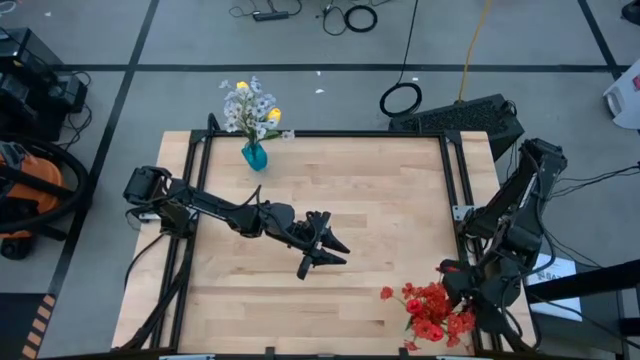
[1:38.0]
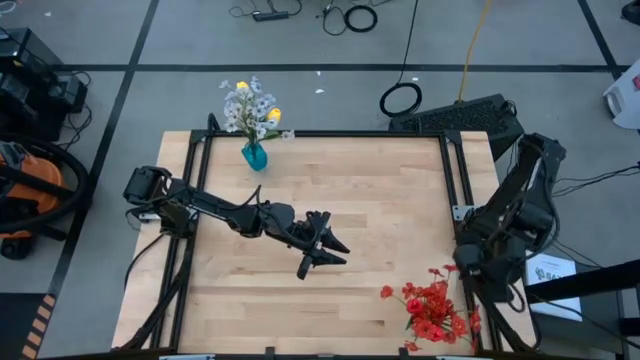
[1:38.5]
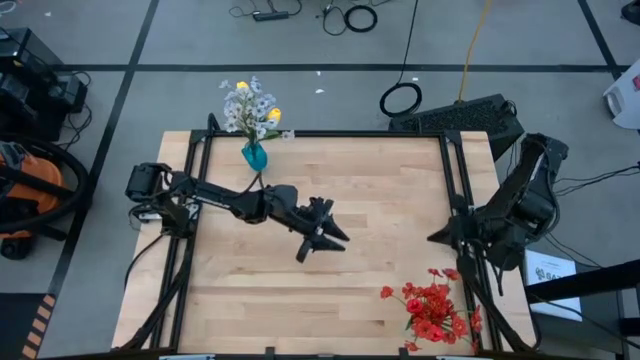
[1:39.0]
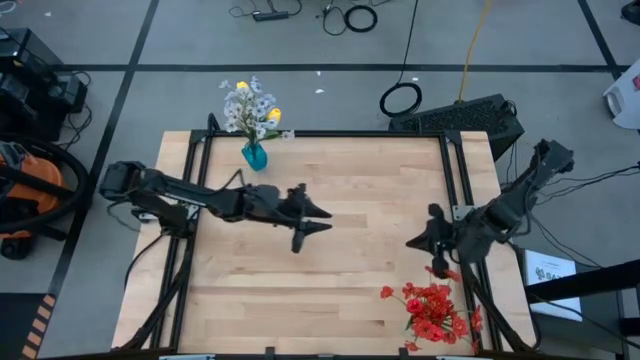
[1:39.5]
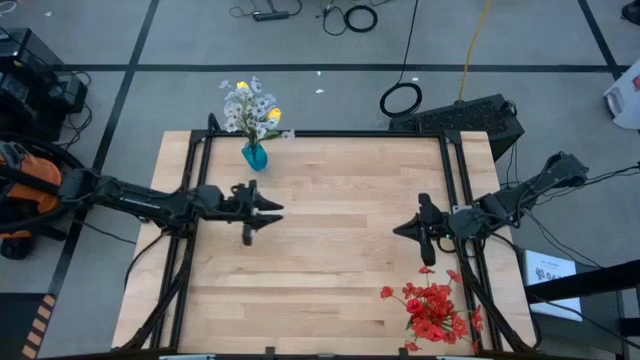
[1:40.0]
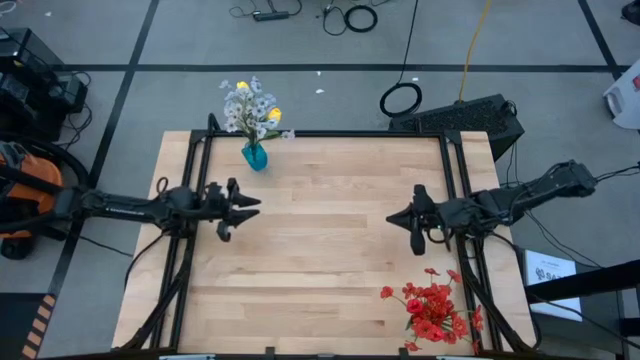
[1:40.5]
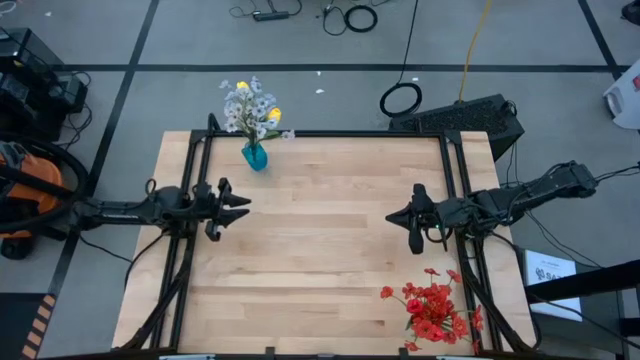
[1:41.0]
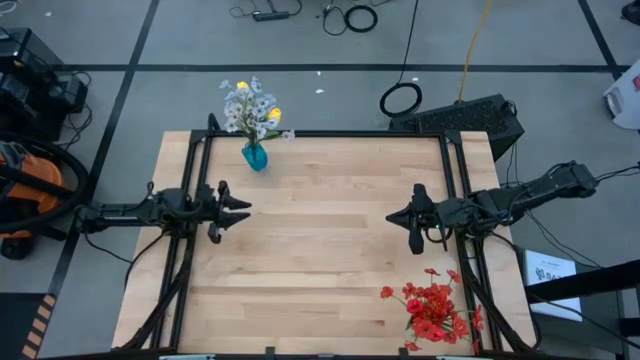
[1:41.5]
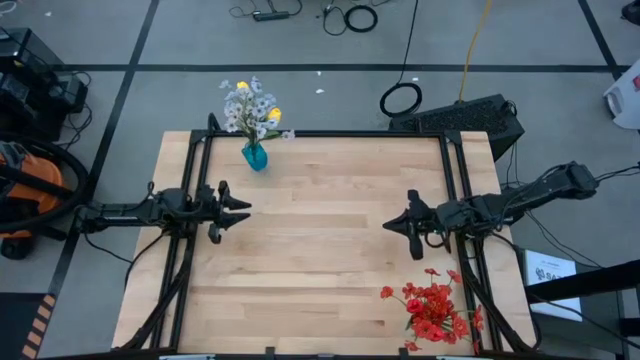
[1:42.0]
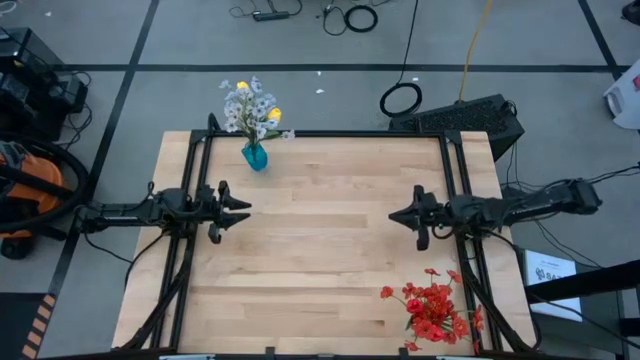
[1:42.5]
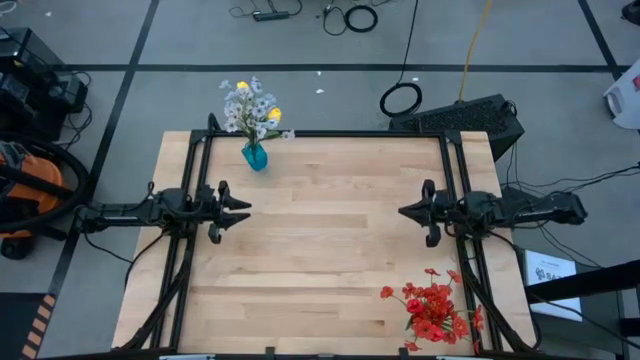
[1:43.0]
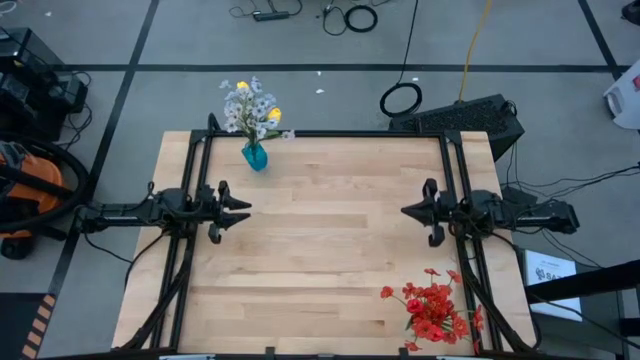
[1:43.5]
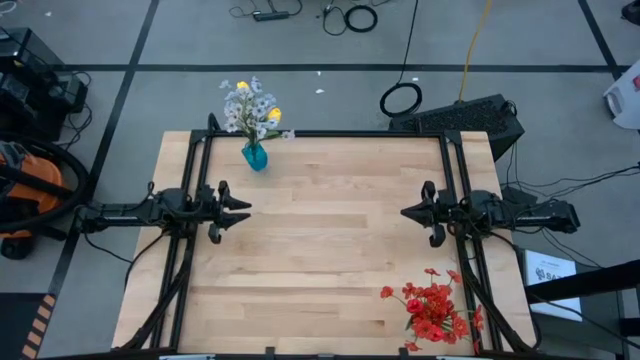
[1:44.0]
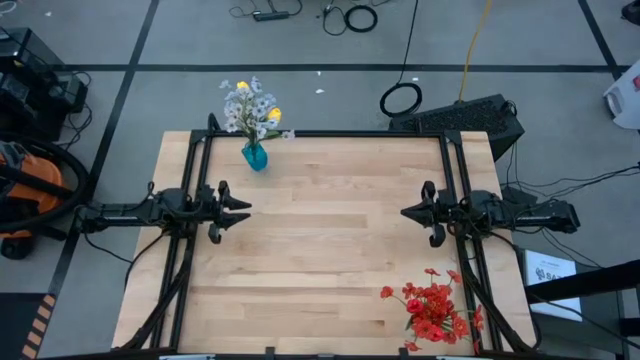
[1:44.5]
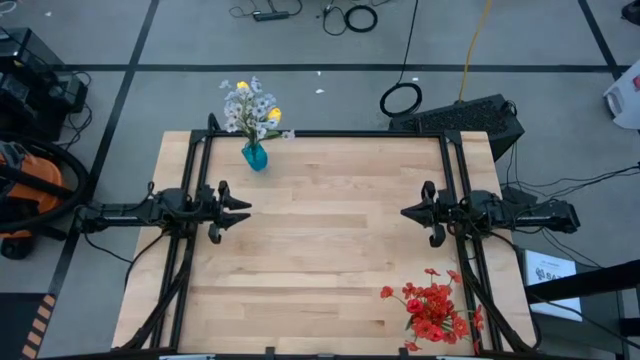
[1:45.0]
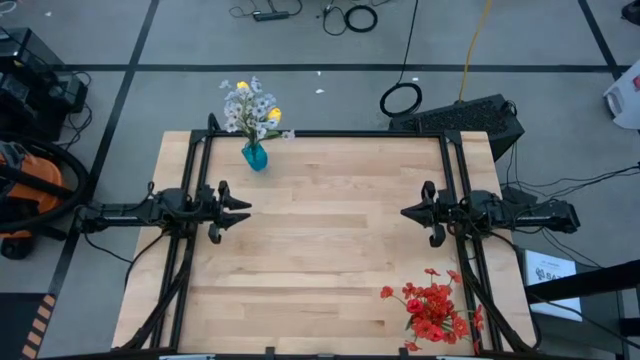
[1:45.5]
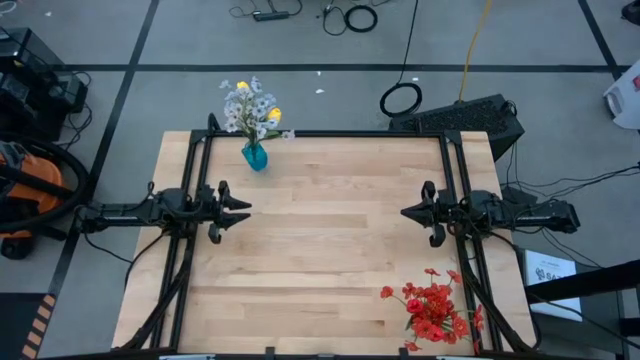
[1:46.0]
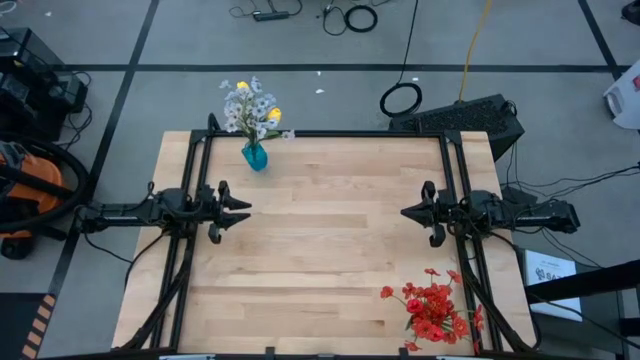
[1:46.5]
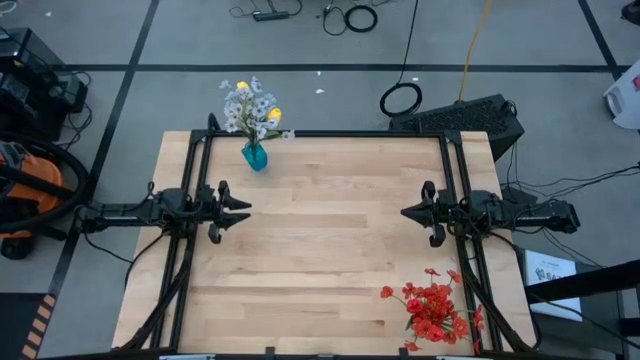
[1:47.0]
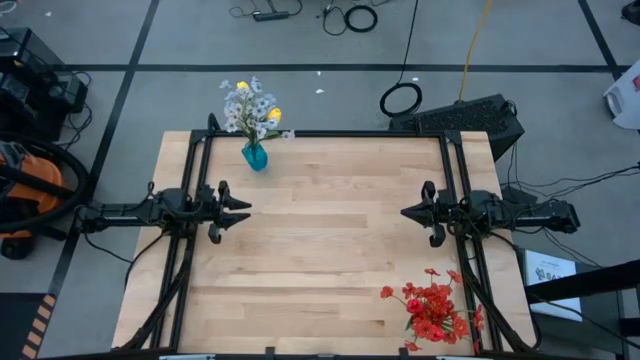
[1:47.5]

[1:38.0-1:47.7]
Task: Sort flowers into vase by color
Return to Home Position

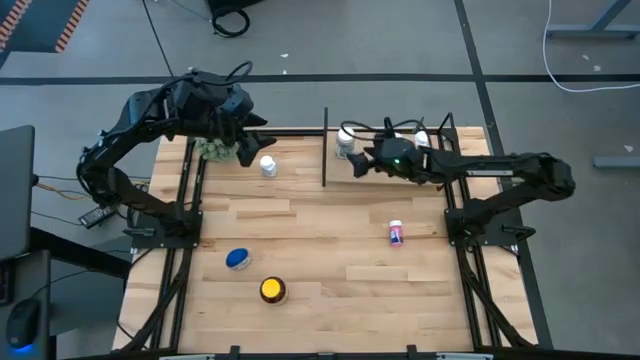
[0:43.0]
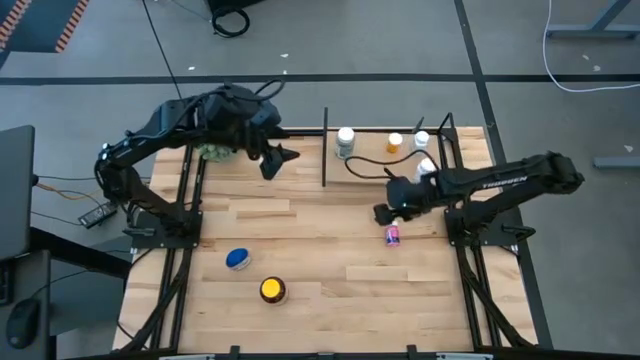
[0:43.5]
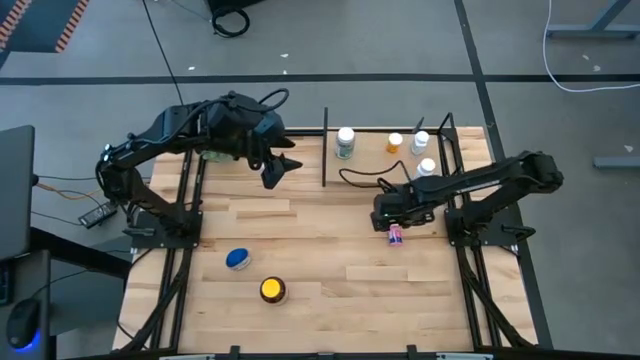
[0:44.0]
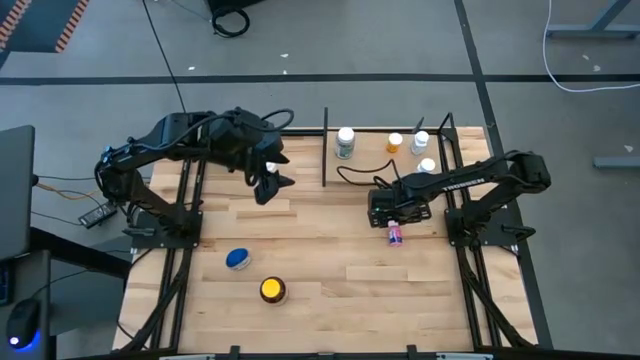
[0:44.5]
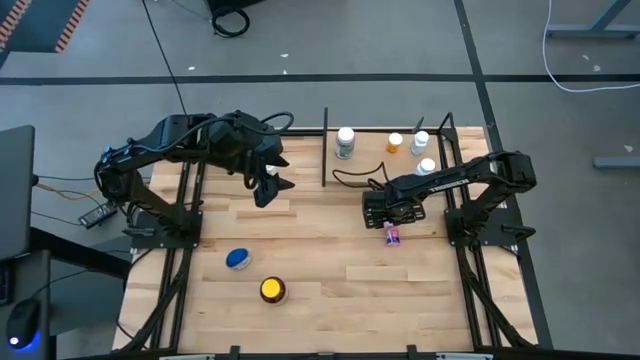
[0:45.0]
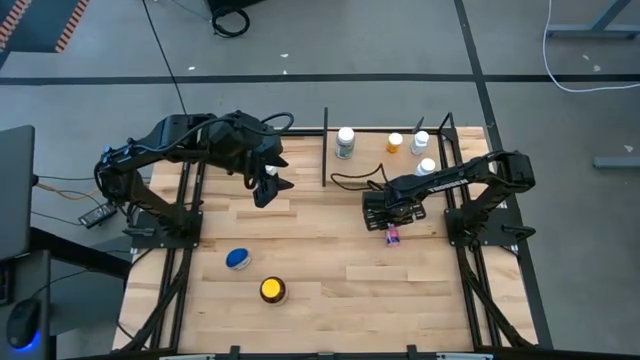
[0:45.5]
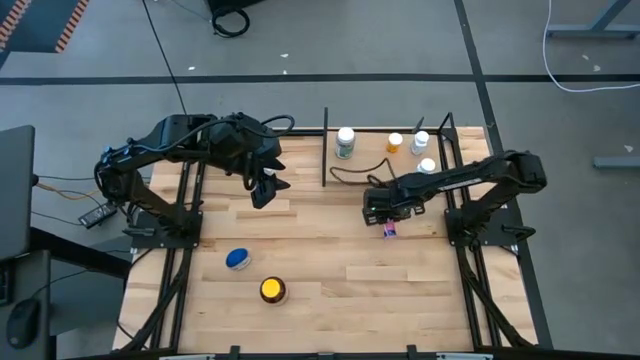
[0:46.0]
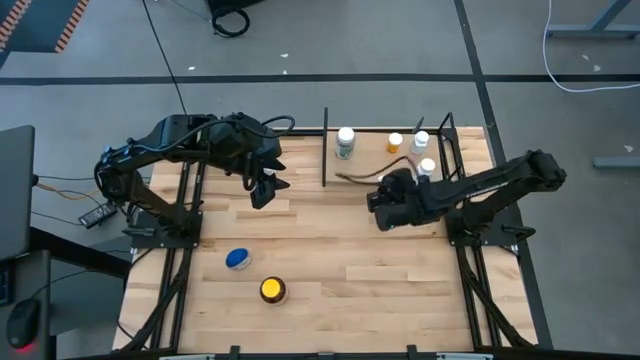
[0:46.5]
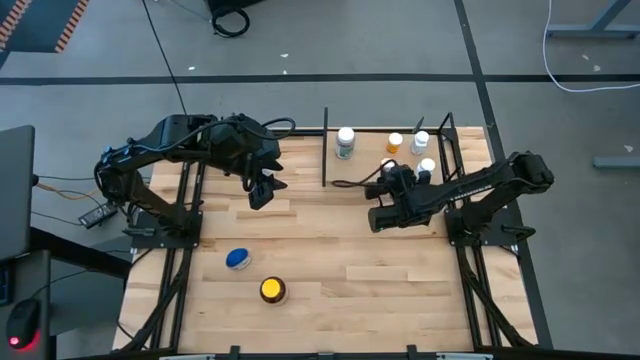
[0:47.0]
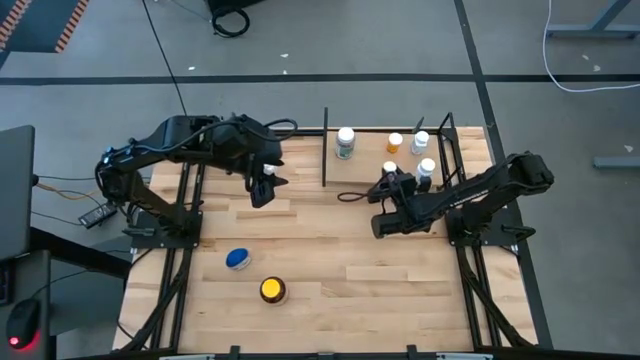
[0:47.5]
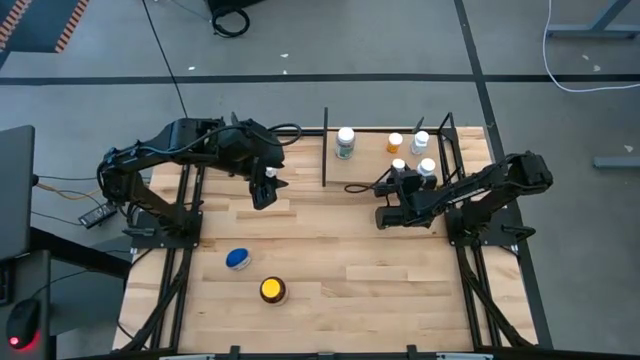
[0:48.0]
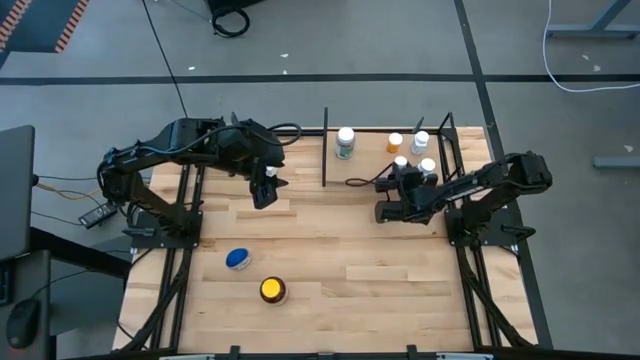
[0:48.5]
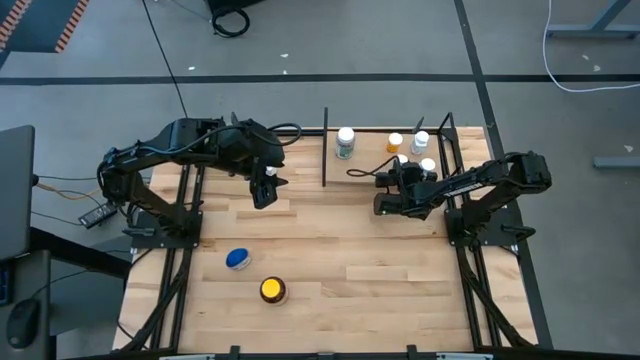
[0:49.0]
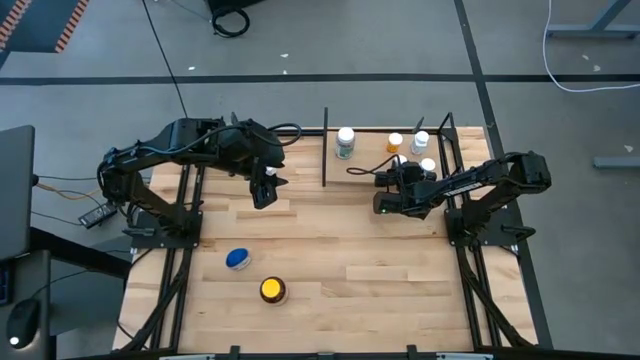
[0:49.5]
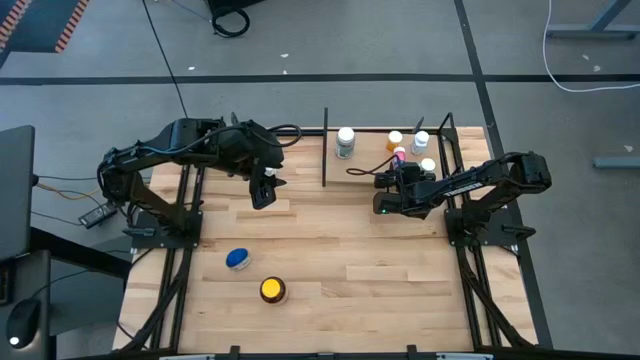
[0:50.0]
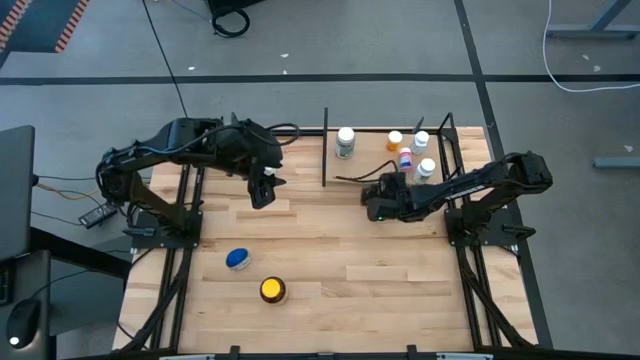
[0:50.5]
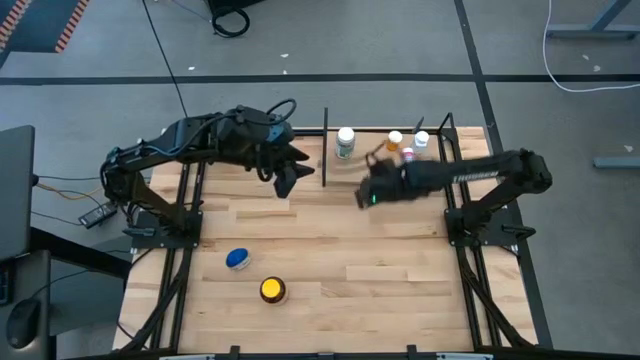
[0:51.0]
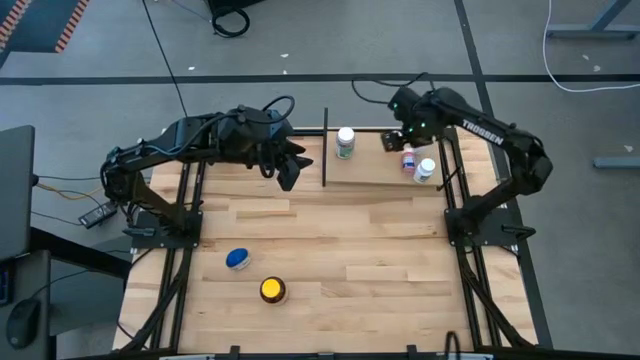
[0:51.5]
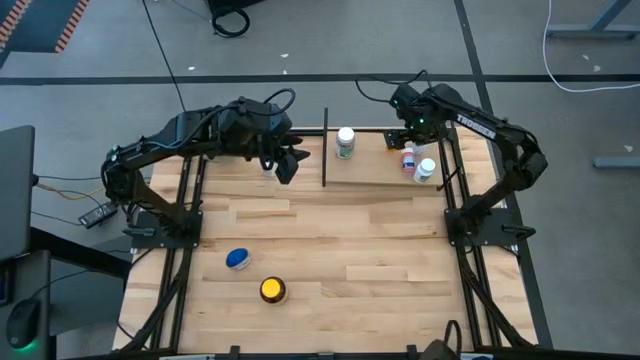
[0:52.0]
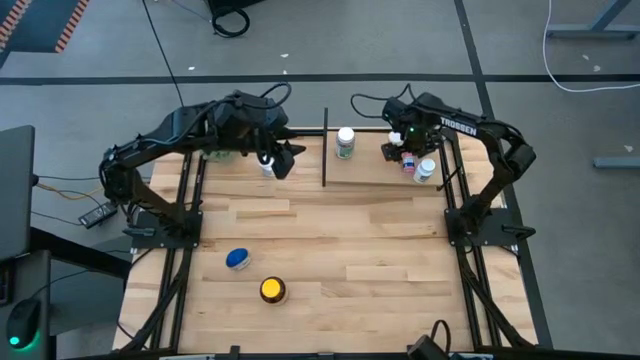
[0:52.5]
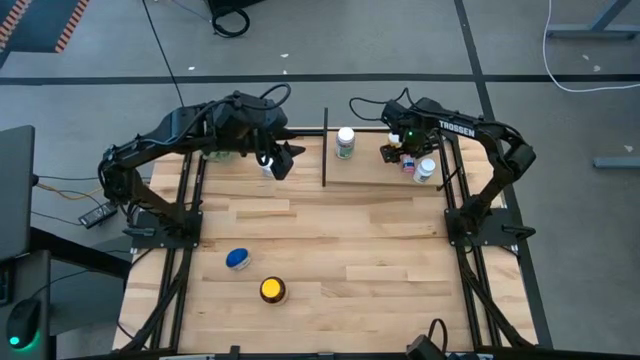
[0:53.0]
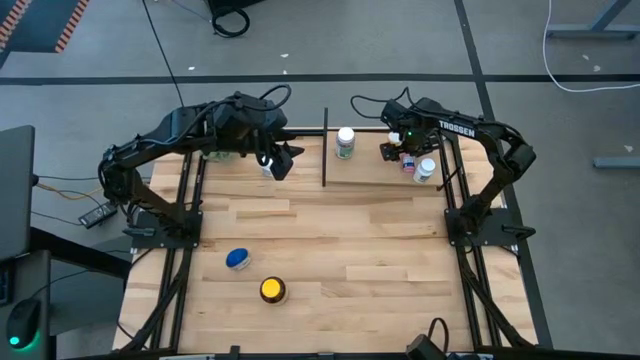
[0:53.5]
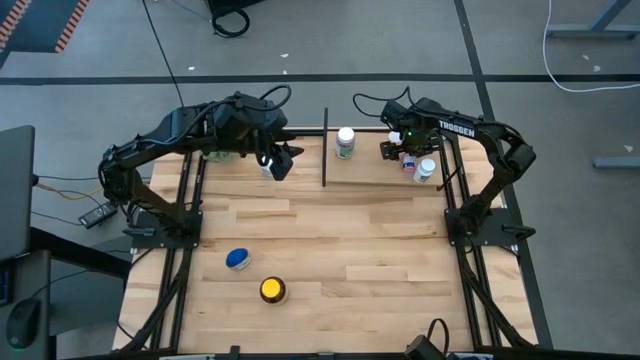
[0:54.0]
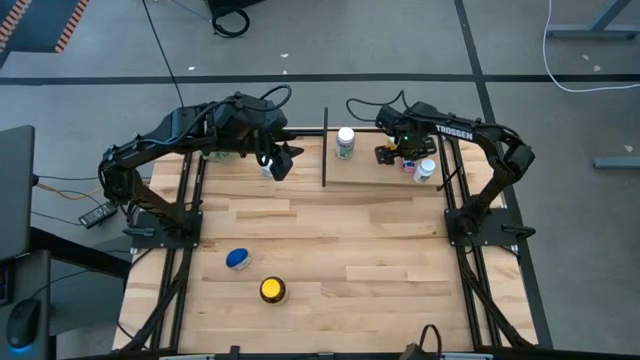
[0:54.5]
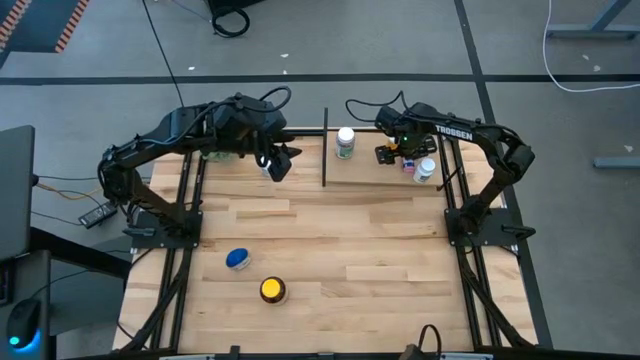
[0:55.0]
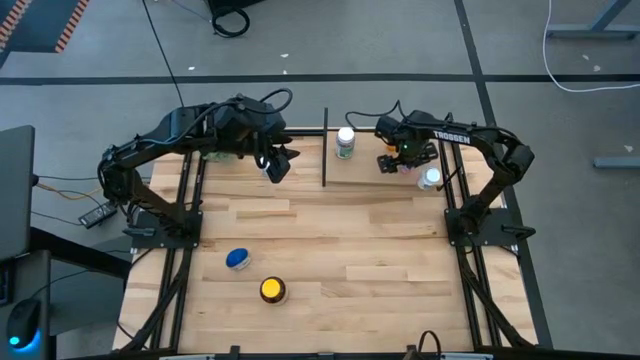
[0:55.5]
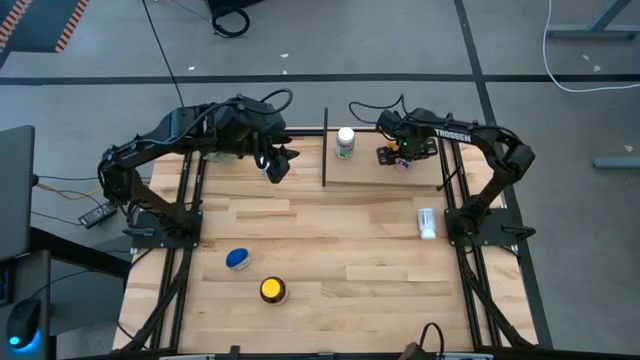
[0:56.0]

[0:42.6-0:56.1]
Task: Pick and place medicine bottles onto shelf by color
Put the pink pill bottle on the shelf
